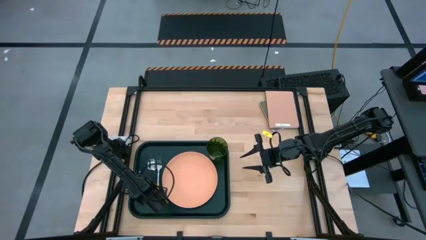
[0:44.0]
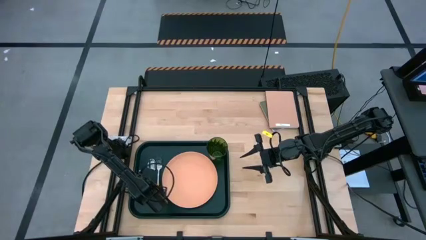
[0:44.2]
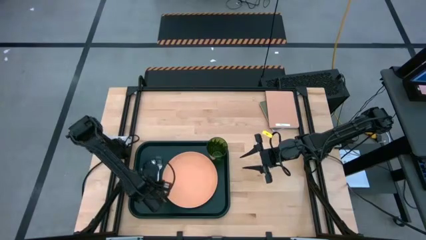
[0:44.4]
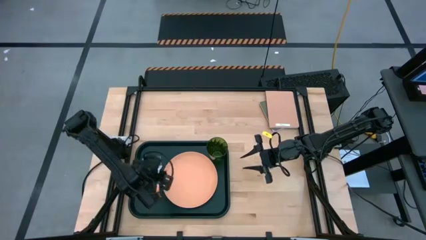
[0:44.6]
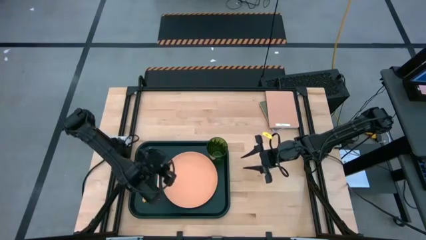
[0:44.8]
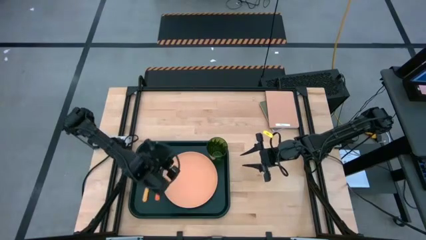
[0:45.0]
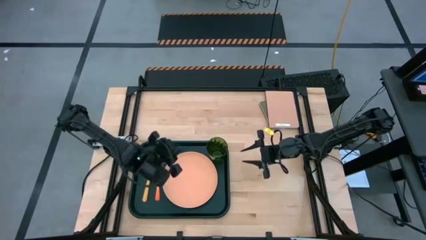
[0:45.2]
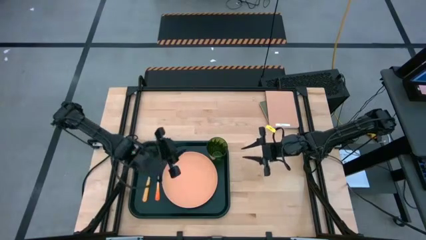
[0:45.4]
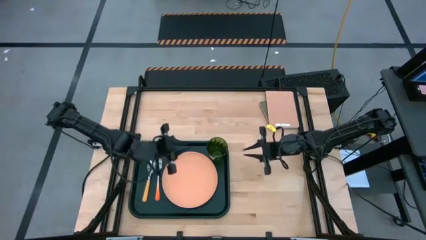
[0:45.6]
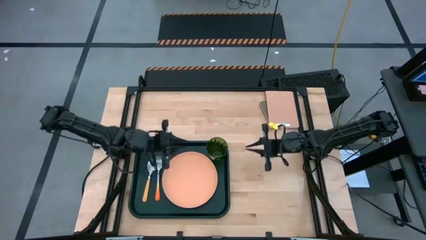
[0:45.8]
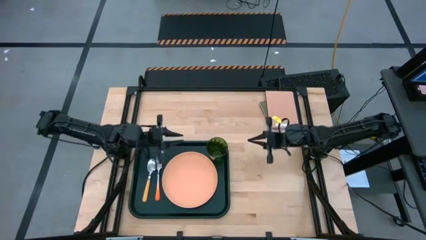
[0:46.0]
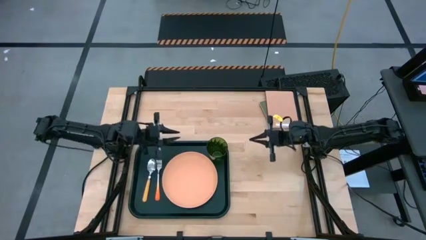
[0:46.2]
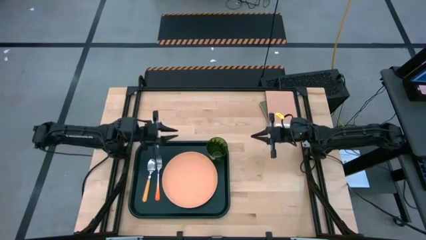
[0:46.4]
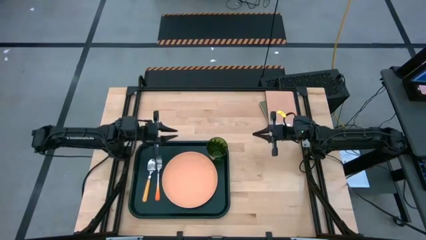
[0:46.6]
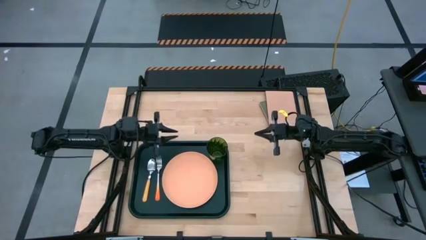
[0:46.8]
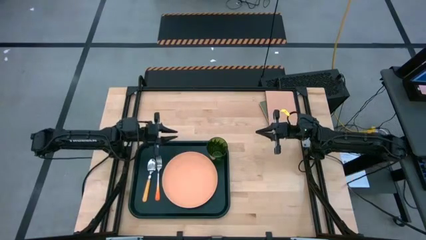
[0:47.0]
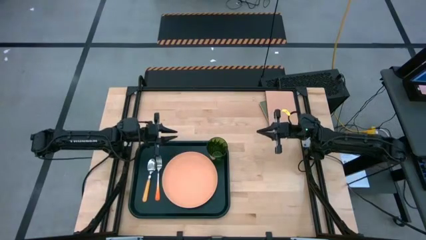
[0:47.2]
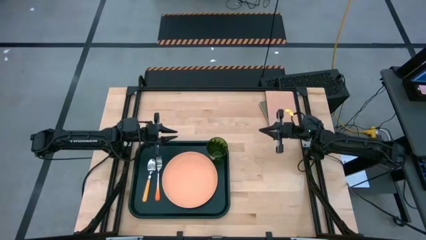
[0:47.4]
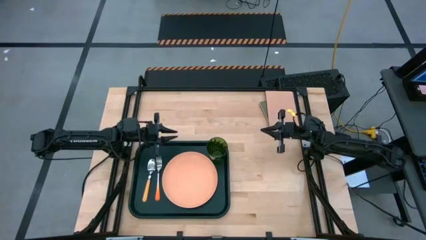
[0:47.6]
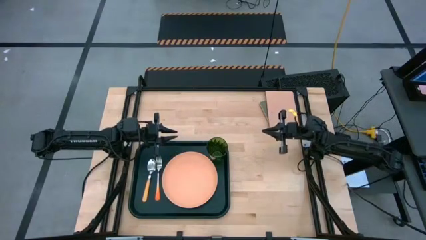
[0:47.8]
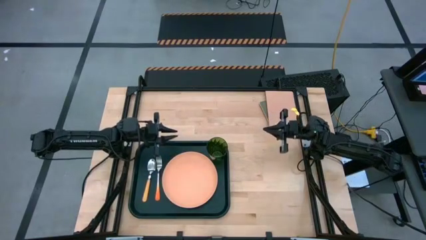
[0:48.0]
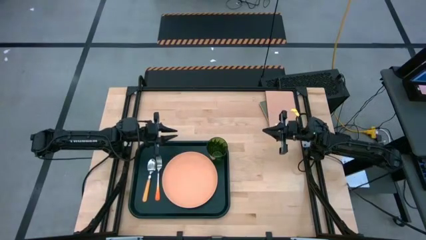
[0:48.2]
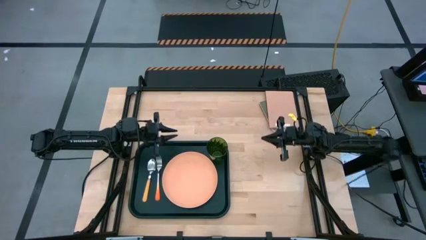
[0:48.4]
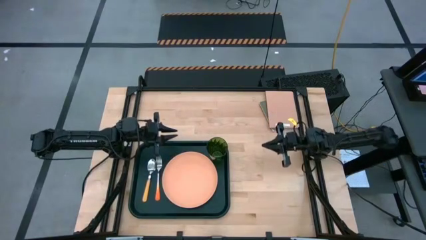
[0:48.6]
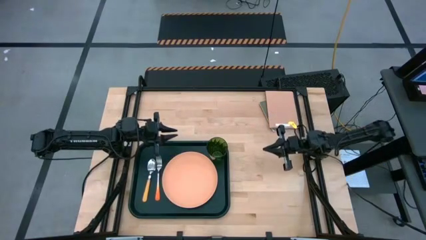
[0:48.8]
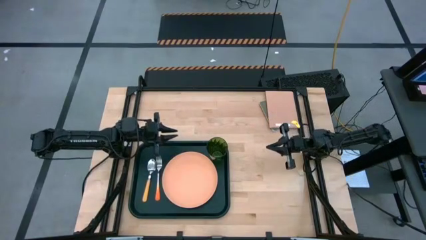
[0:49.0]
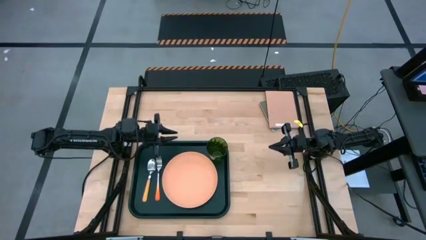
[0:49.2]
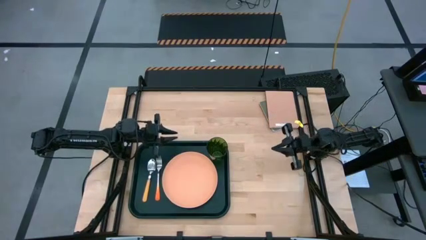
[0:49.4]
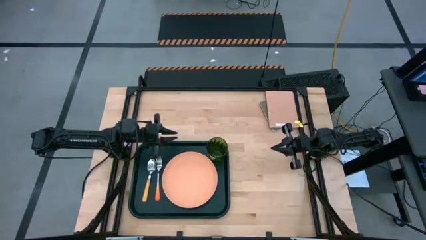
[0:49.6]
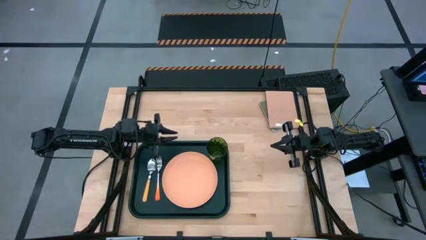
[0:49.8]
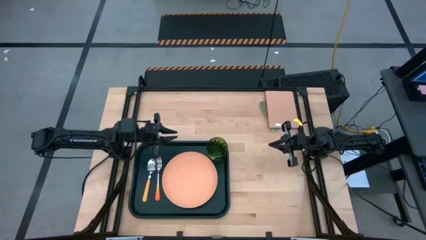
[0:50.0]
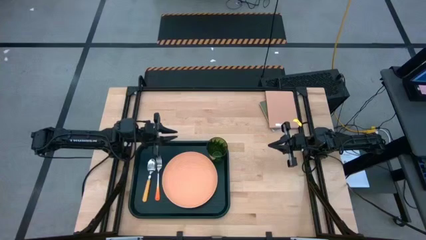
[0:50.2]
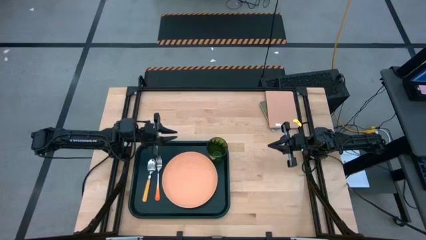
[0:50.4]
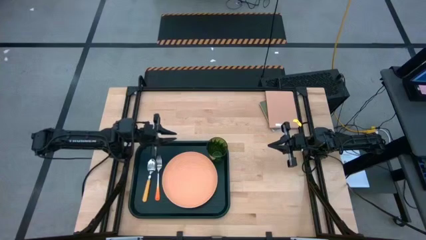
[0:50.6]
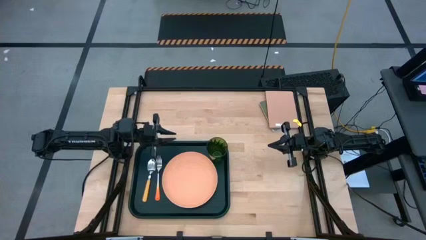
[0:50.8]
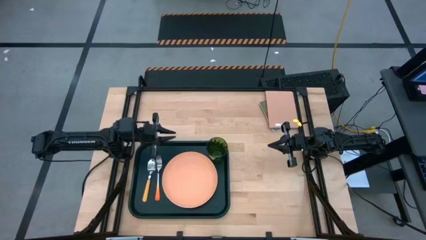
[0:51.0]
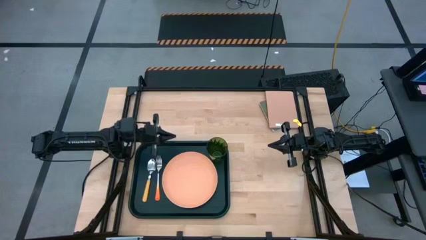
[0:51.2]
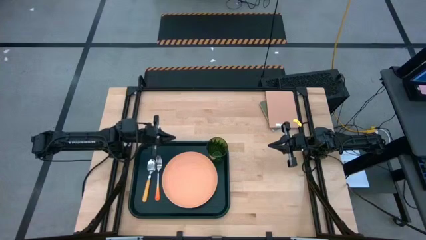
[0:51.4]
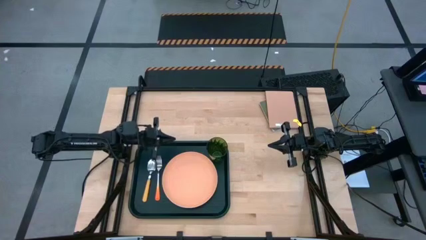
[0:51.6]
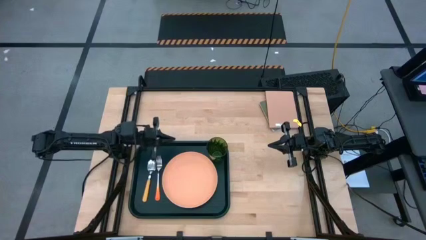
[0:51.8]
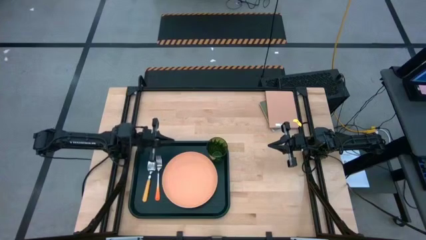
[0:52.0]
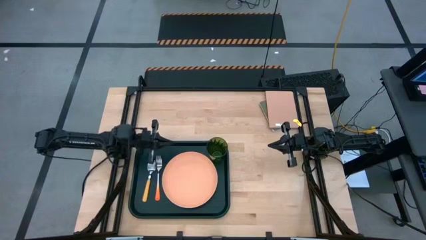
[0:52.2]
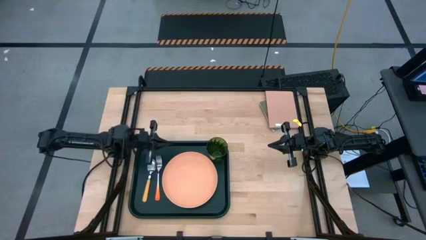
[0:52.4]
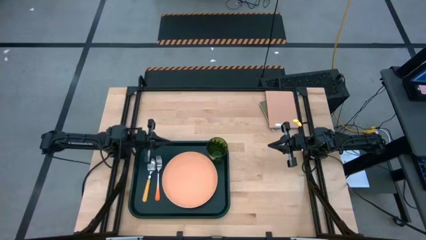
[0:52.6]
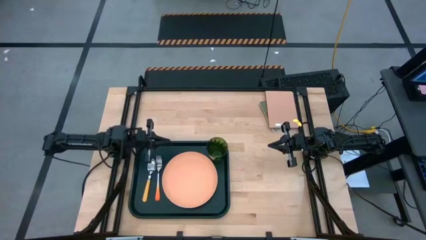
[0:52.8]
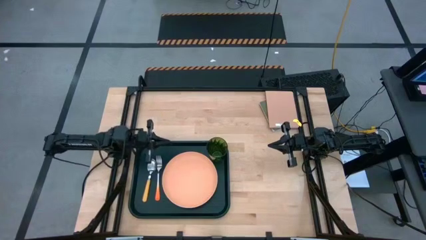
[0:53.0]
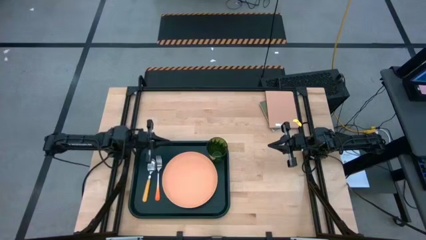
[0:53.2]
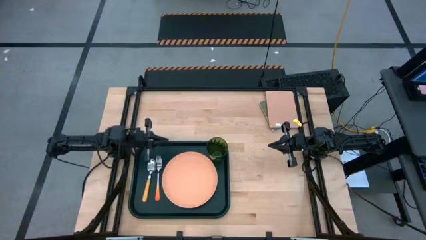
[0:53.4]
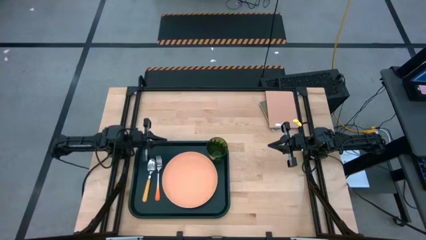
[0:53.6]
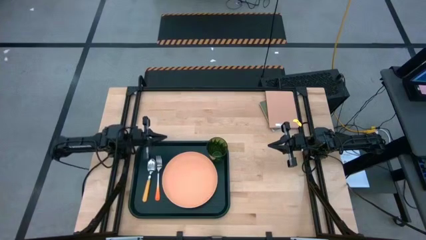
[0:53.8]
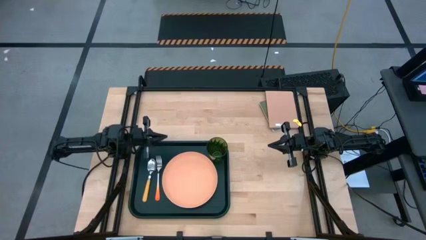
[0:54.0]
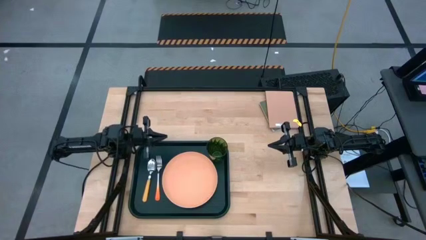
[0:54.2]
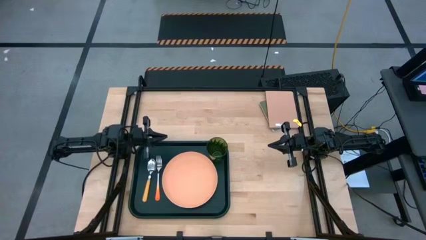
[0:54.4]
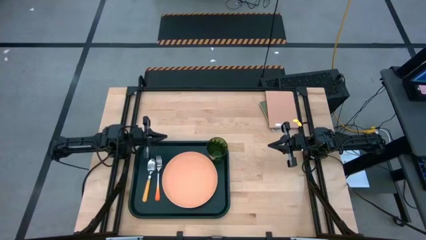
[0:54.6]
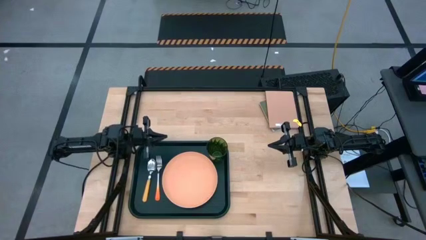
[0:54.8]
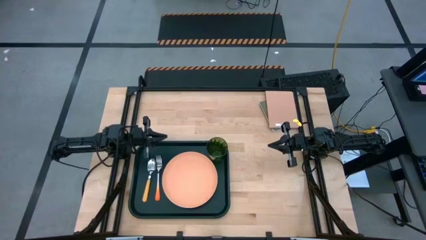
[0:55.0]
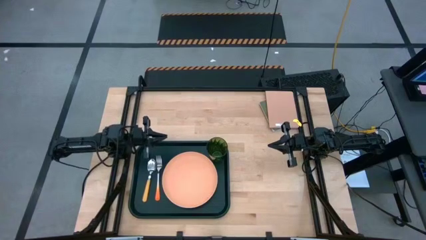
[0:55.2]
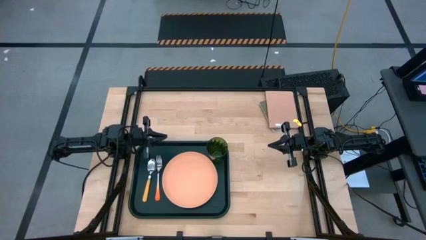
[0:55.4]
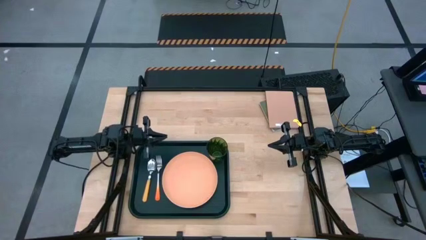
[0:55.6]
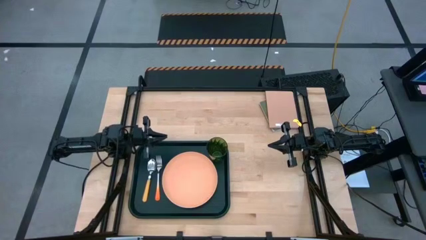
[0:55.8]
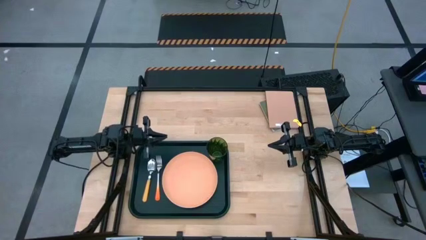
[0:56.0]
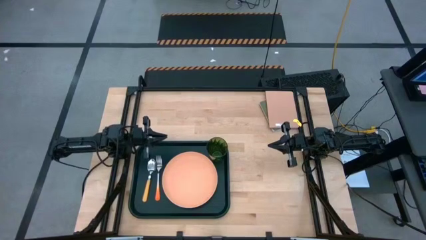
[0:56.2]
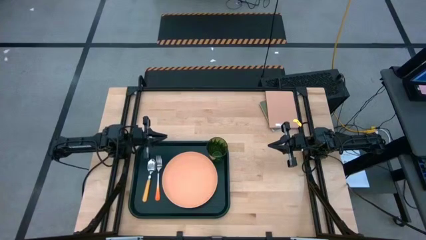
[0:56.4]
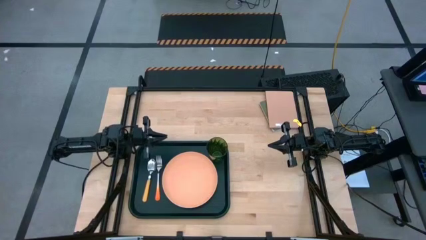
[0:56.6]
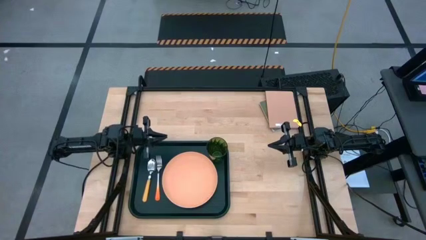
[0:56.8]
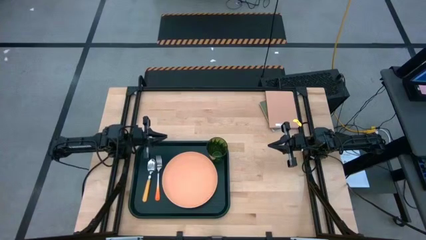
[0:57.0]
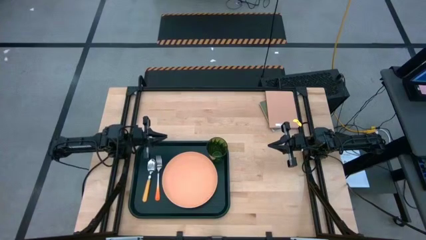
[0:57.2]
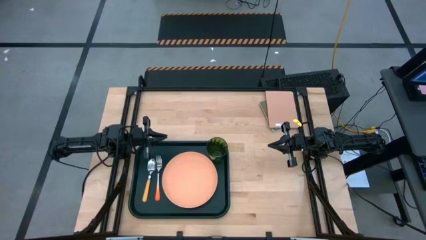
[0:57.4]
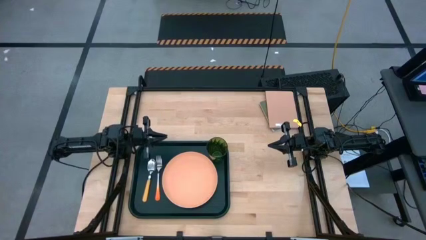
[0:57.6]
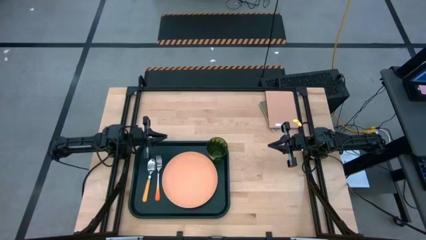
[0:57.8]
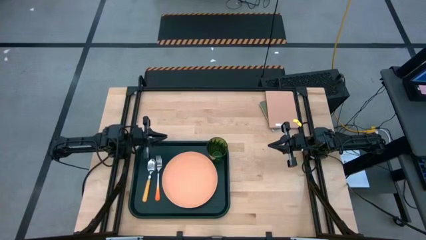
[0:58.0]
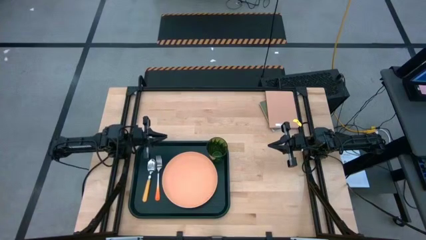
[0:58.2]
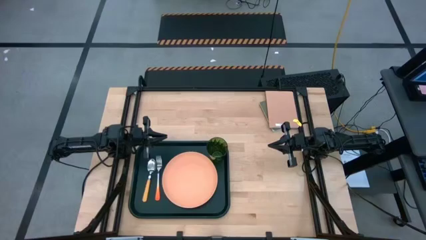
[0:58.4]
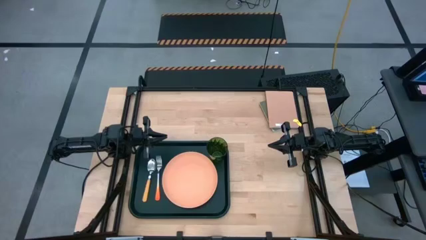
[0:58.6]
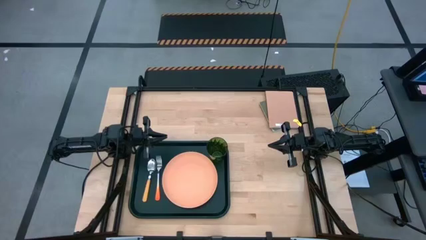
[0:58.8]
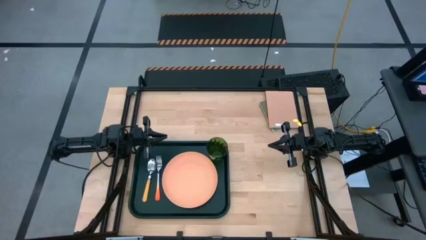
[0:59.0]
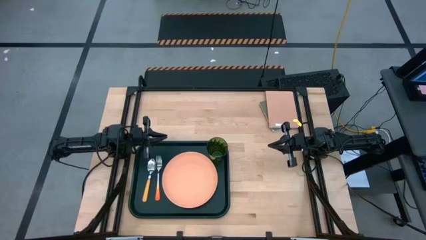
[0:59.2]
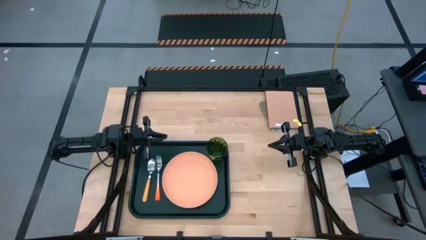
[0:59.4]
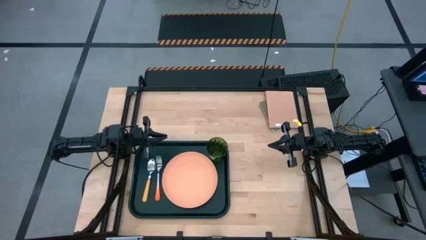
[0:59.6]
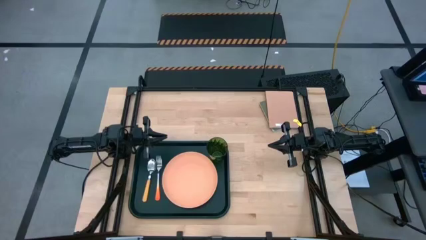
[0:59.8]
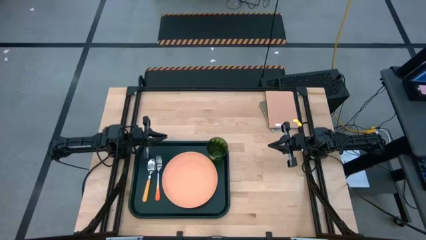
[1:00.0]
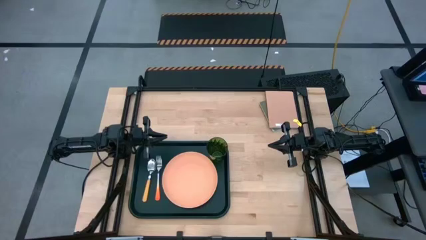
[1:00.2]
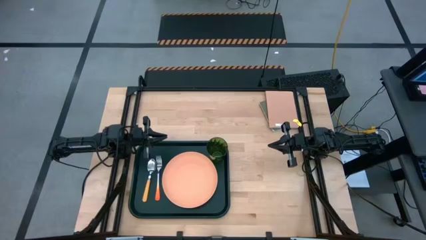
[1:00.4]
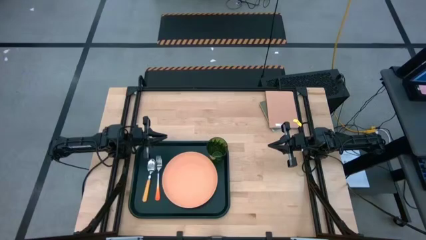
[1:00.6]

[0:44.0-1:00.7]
Task: Pick and place plate/cup/fork/spoon on tray
Return to Home Position
